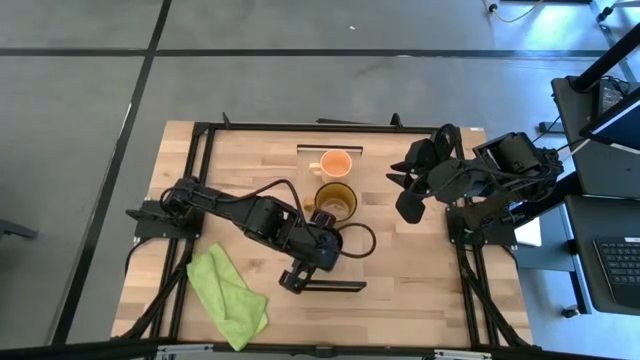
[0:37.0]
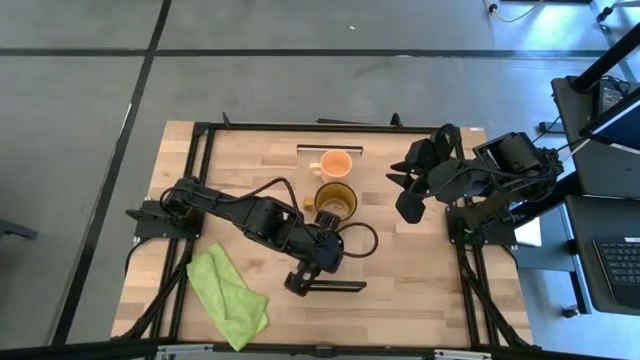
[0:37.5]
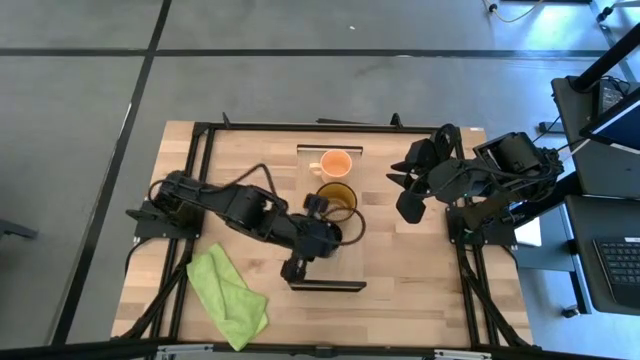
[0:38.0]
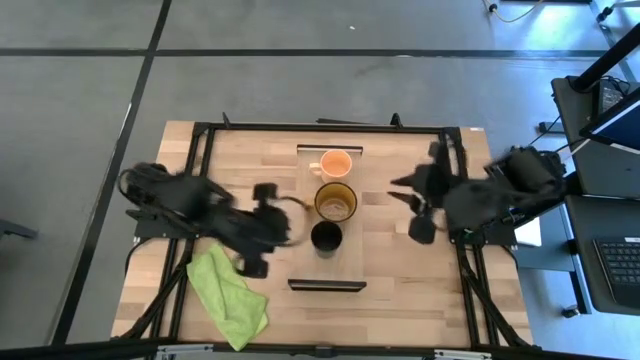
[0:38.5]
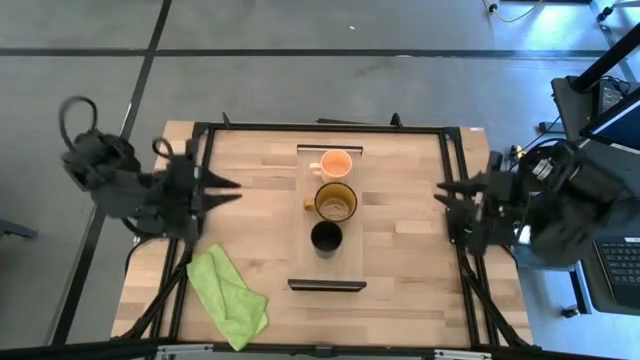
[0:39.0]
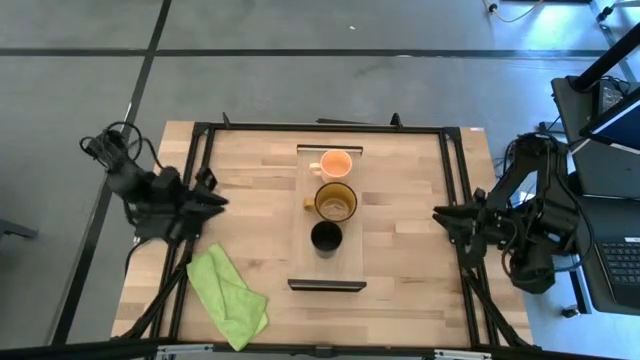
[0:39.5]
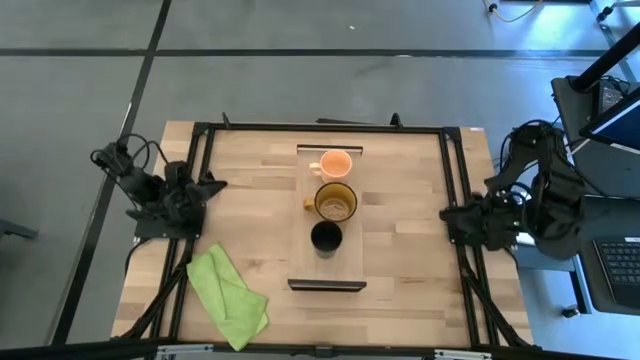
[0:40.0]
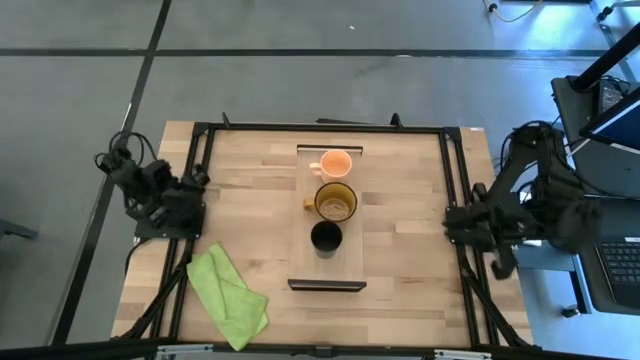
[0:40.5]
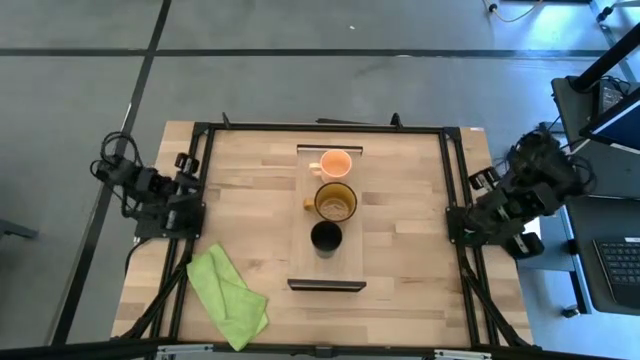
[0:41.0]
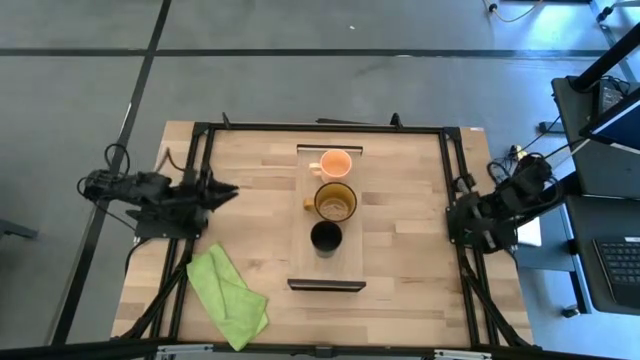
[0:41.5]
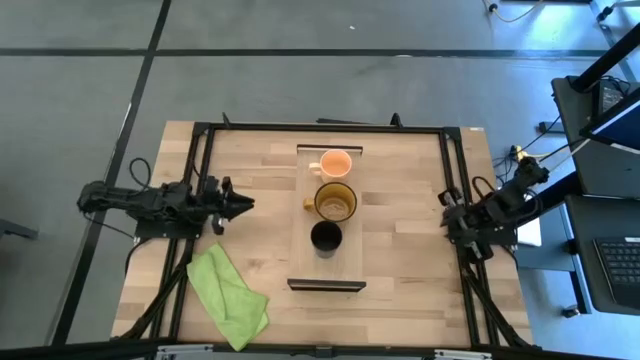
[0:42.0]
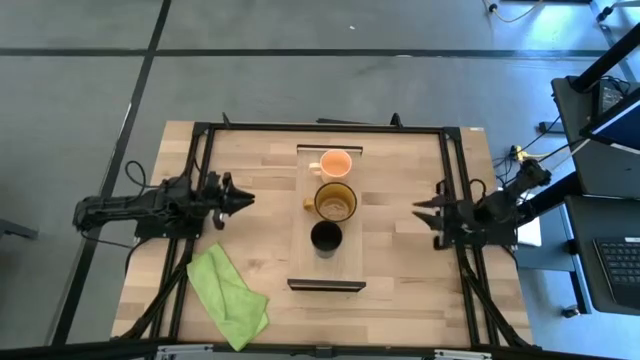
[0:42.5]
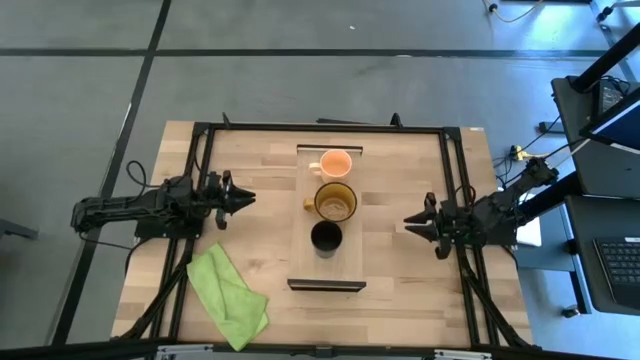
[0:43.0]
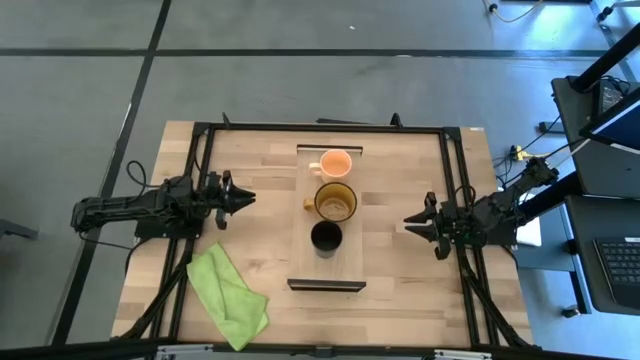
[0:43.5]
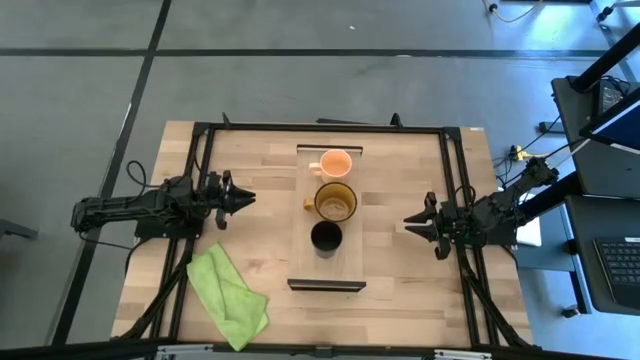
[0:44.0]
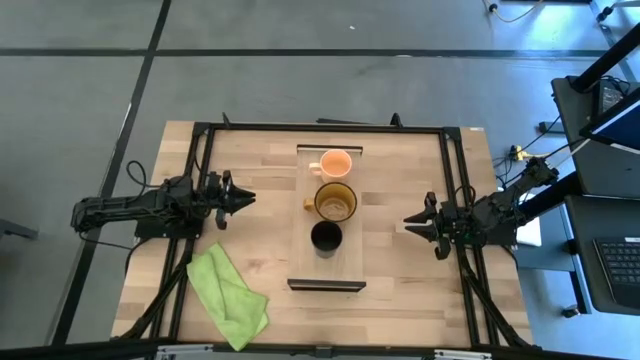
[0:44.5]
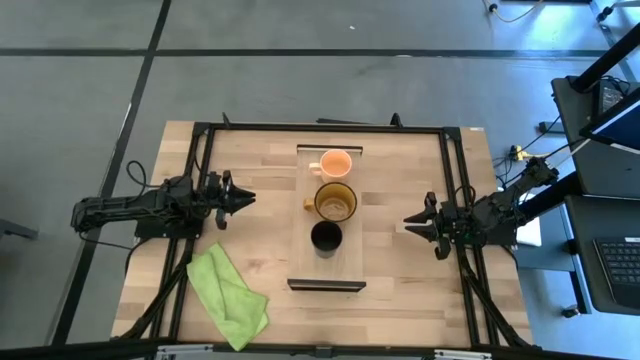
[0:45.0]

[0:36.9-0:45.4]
Task: Stack small to large cups/mugs on shelf
Return to Home Position

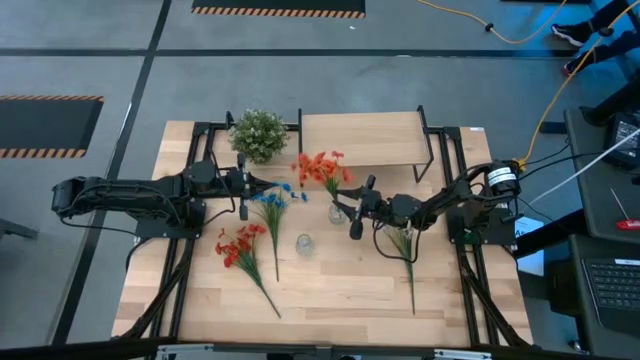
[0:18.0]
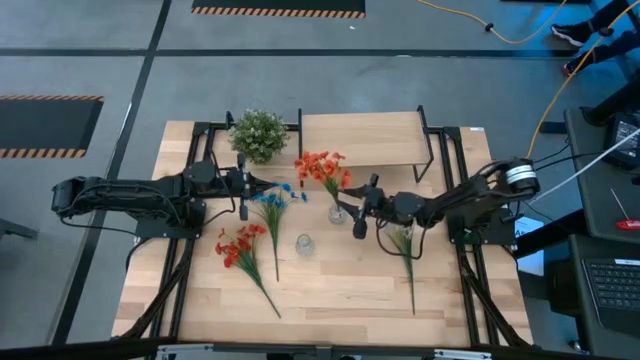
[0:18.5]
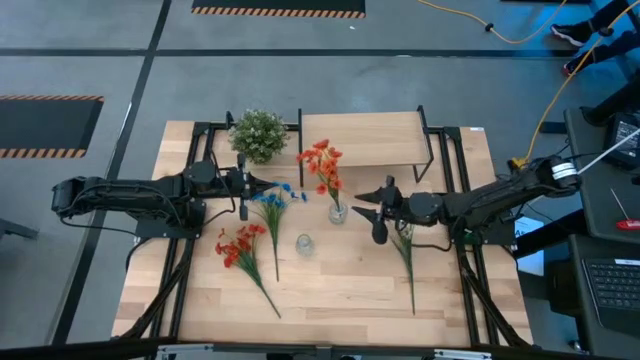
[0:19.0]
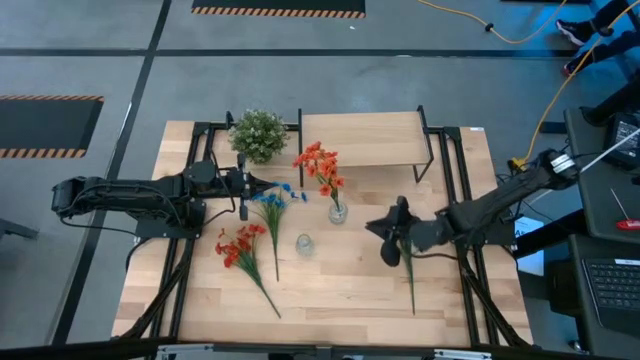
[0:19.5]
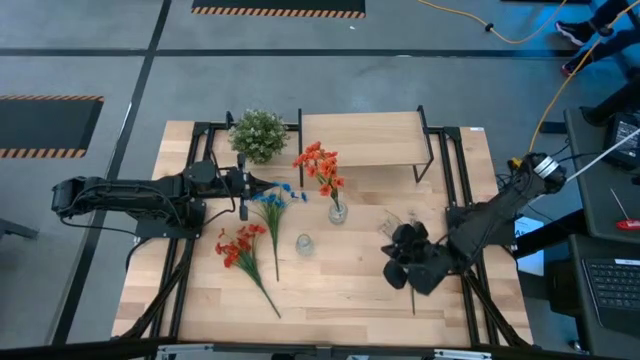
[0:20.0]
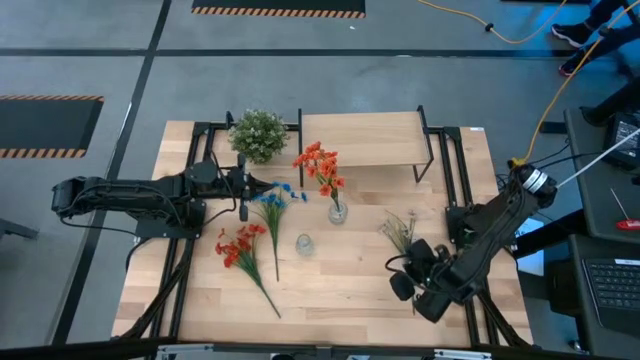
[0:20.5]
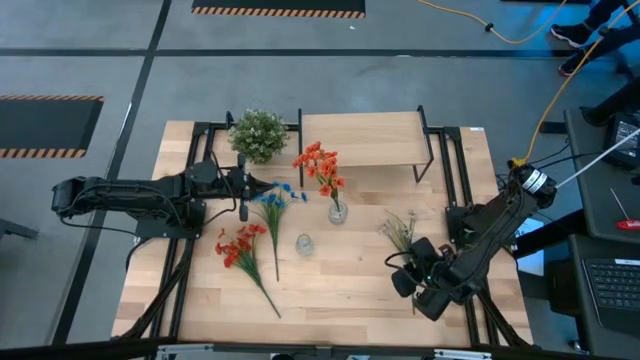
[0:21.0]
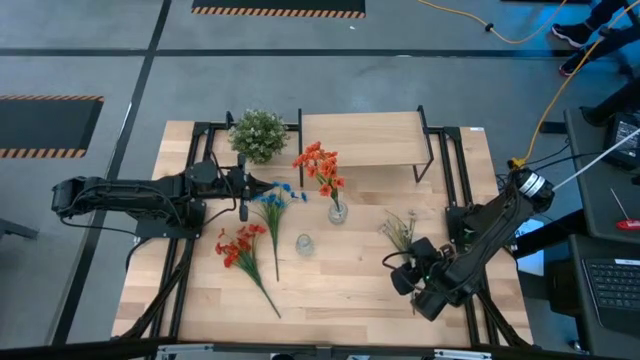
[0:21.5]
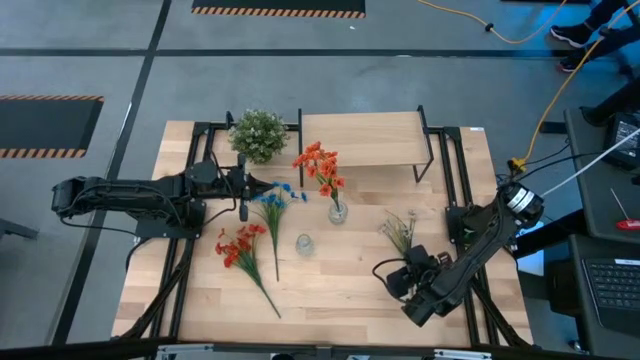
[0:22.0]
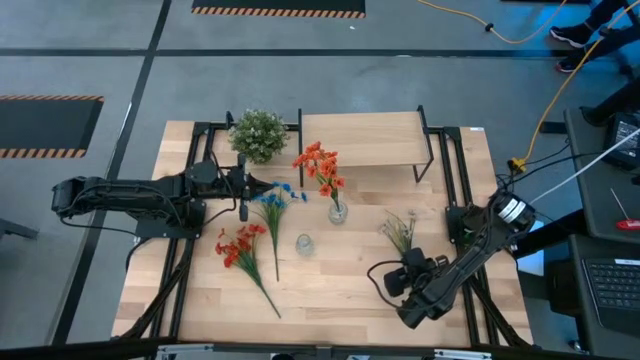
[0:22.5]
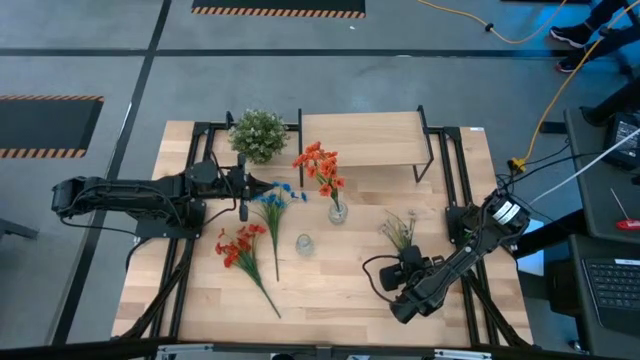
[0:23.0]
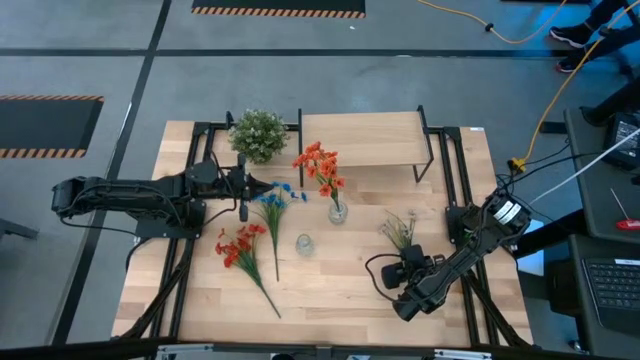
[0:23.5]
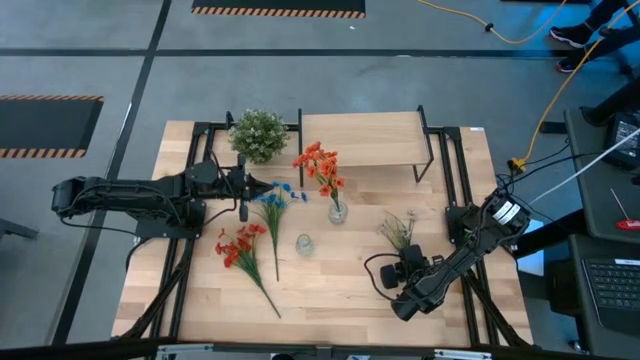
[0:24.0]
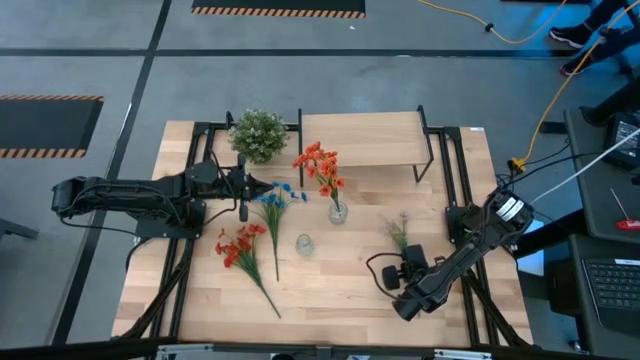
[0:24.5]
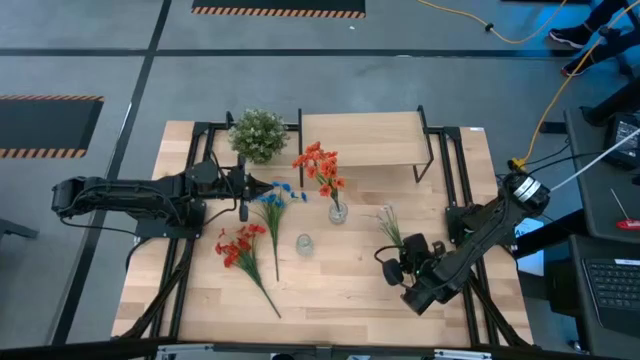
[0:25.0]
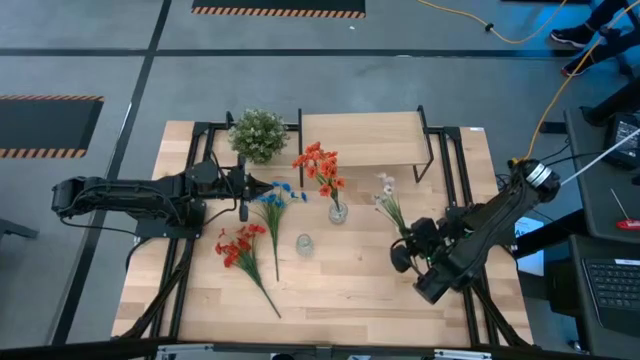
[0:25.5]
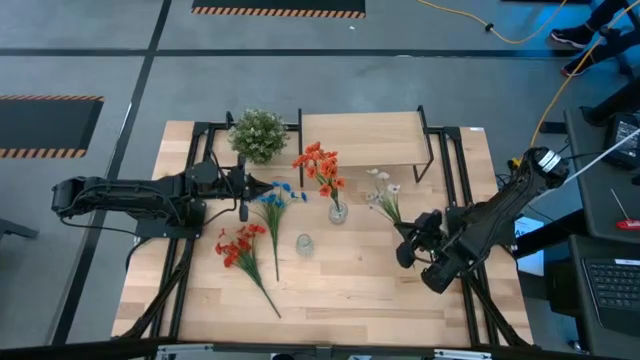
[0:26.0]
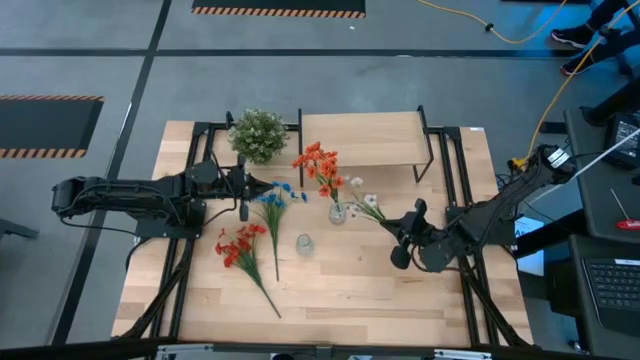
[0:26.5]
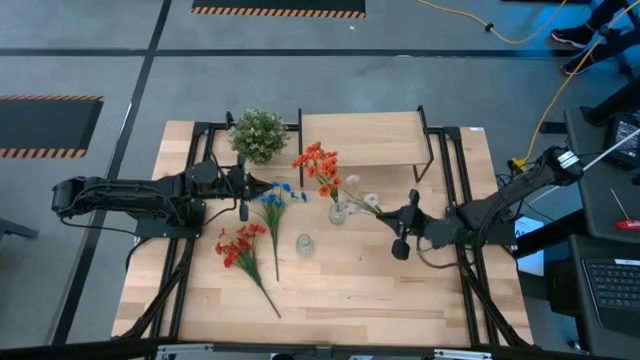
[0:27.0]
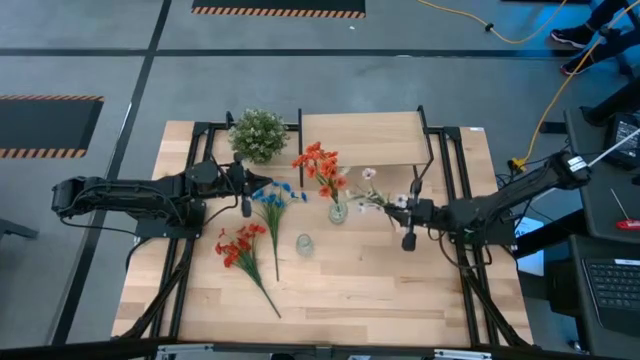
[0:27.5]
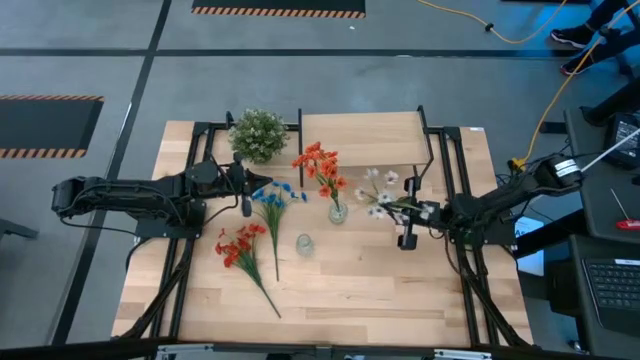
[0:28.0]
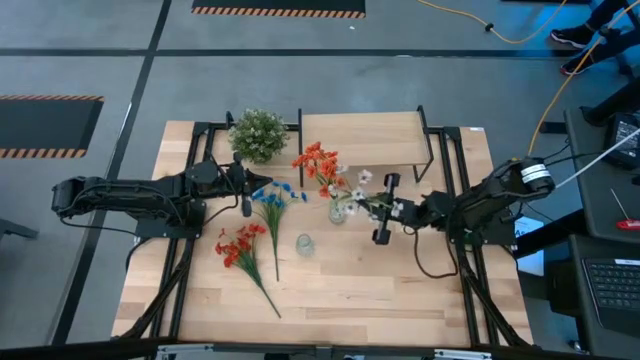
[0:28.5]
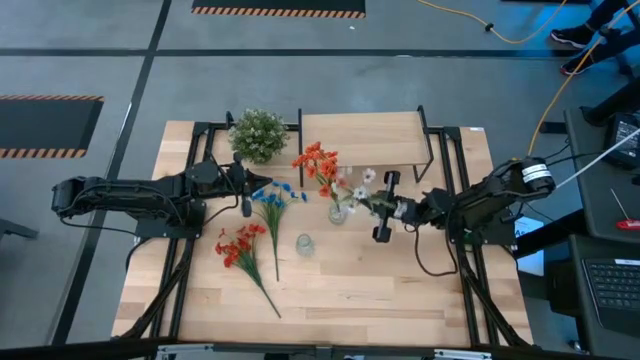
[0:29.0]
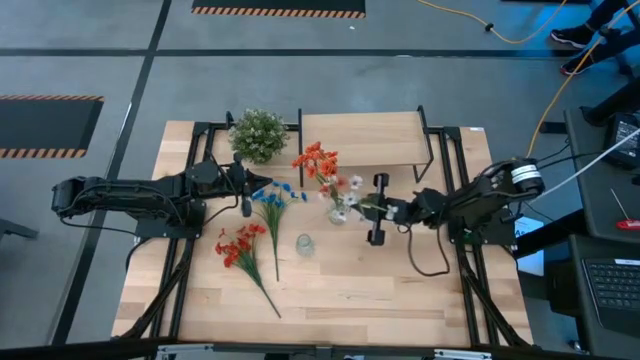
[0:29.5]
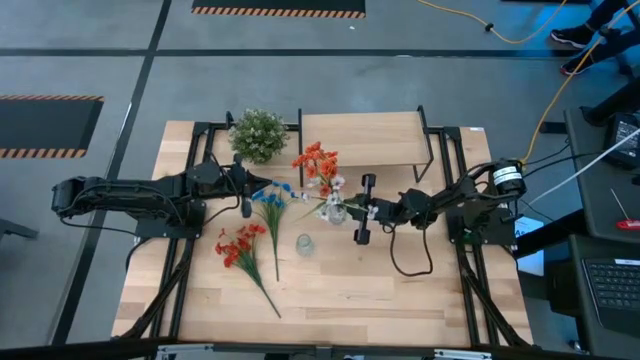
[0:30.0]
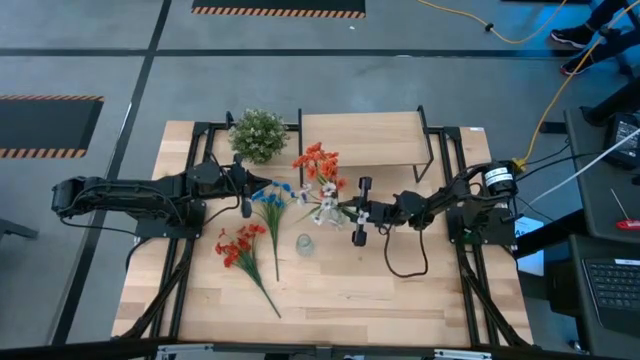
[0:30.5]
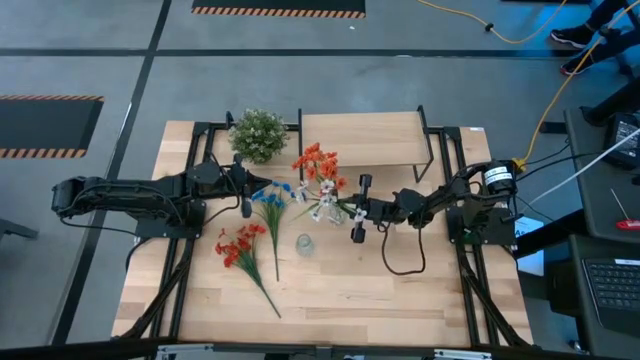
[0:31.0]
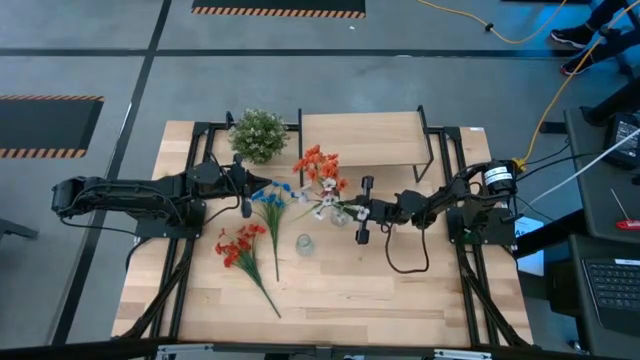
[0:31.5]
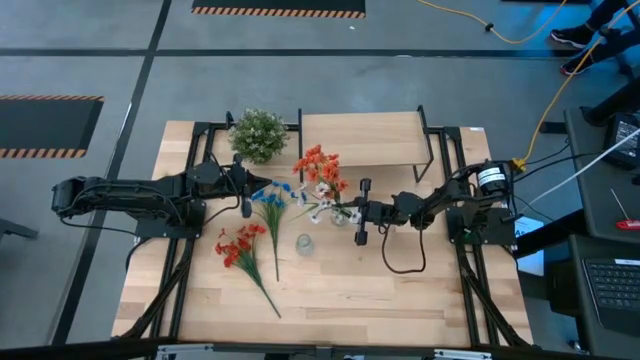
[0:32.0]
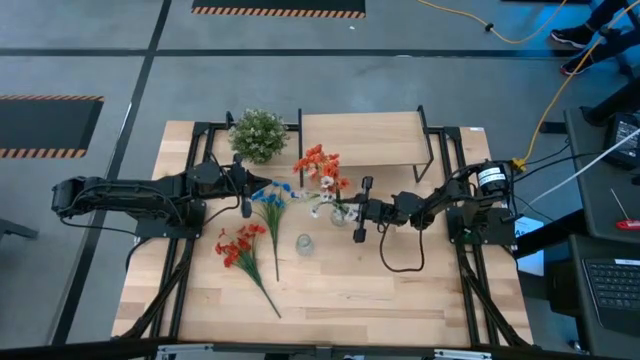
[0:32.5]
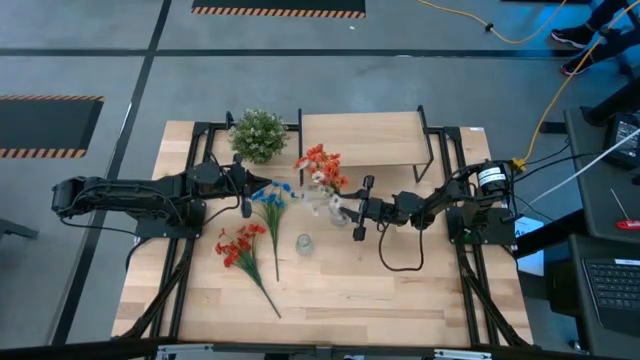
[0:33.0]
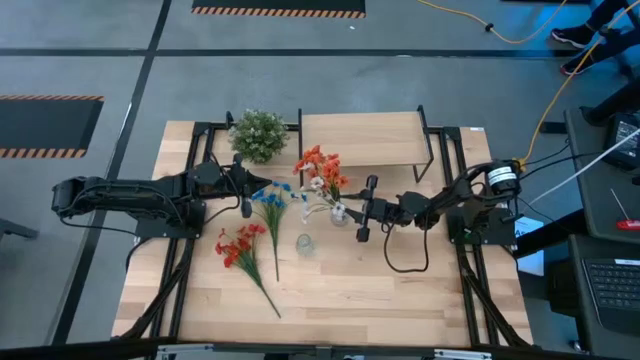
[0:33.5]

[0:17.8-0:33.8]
Task: Pick and place flowers into a vace then onto a shelf
Put the white flowers into the top transparent vase
